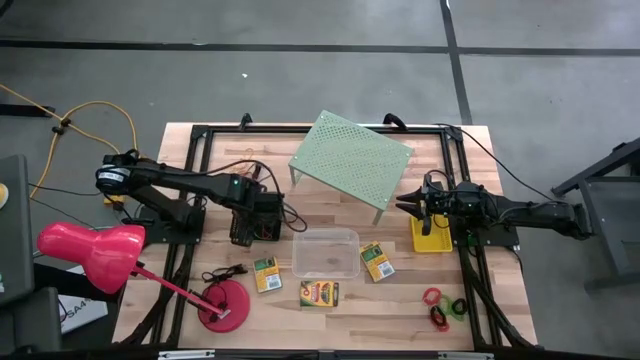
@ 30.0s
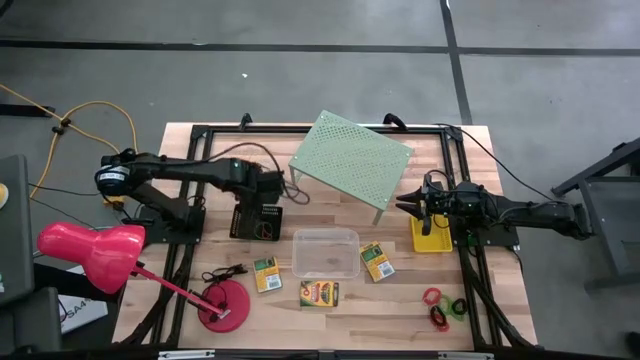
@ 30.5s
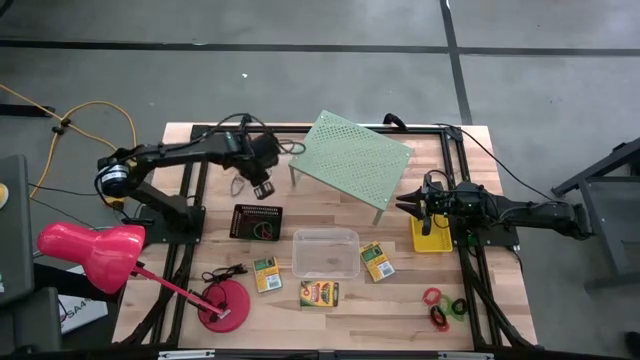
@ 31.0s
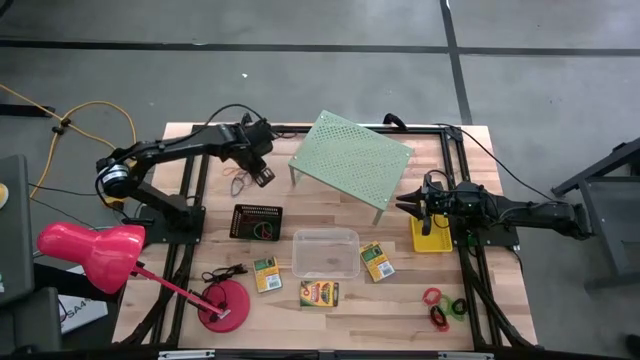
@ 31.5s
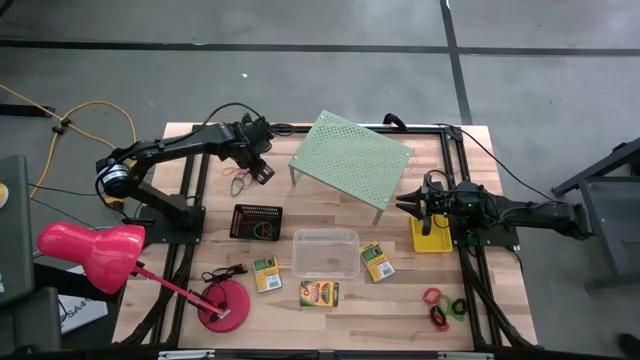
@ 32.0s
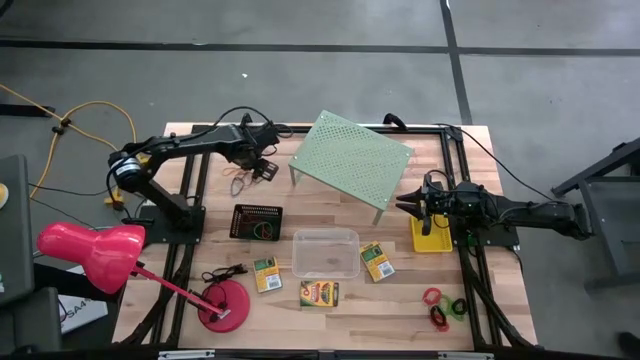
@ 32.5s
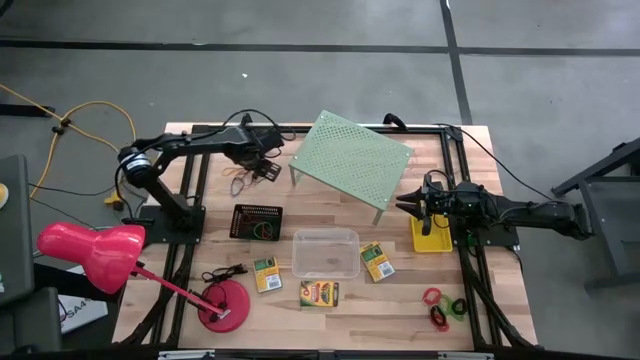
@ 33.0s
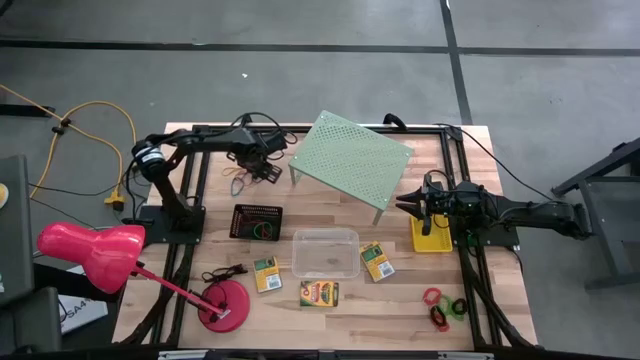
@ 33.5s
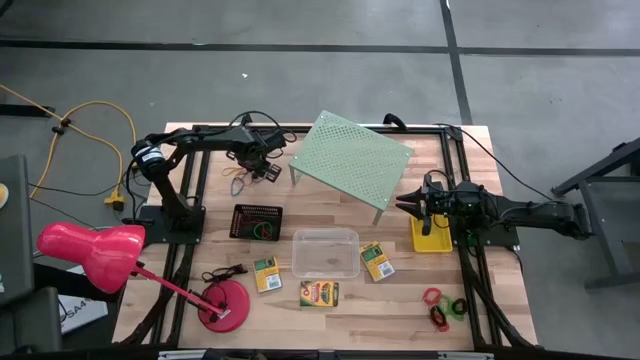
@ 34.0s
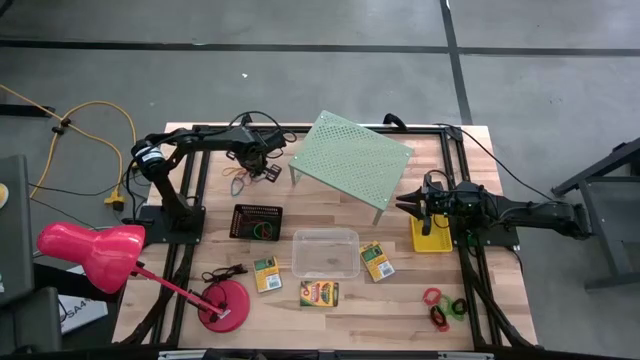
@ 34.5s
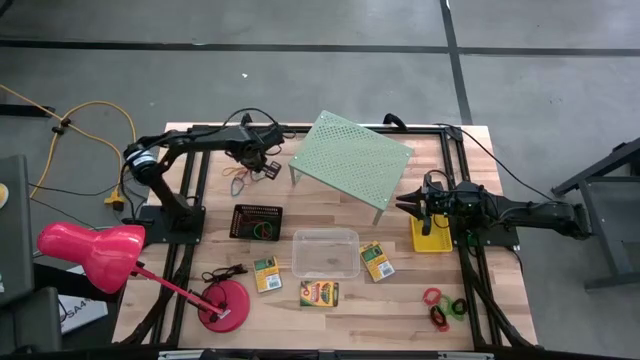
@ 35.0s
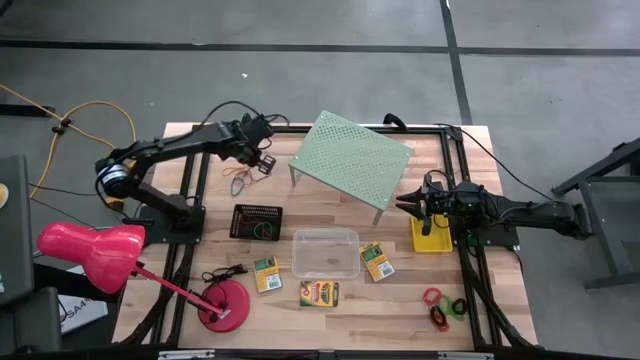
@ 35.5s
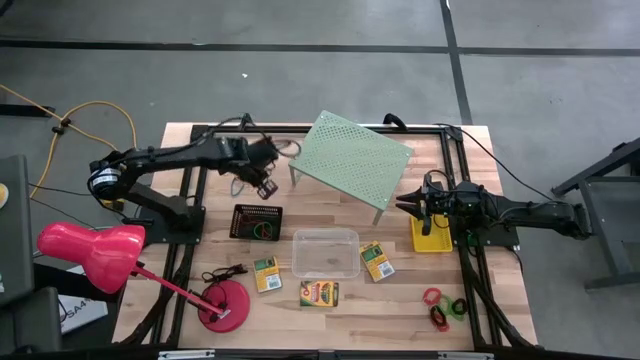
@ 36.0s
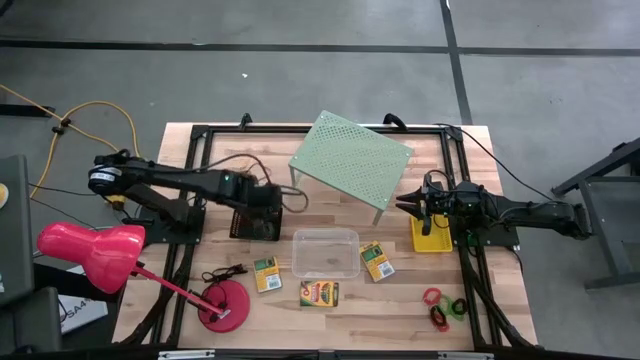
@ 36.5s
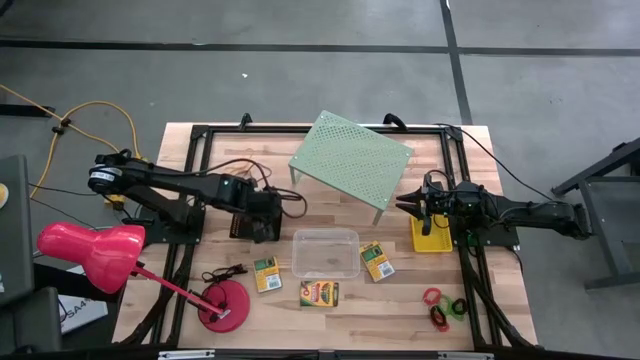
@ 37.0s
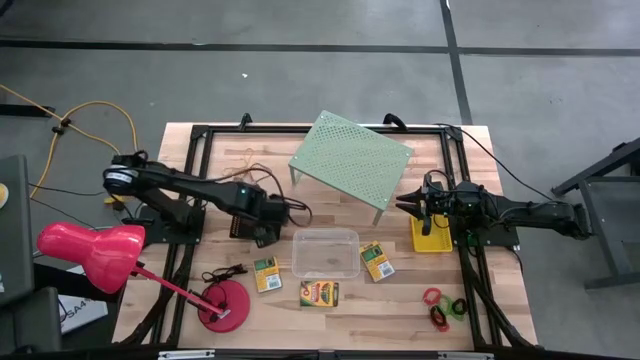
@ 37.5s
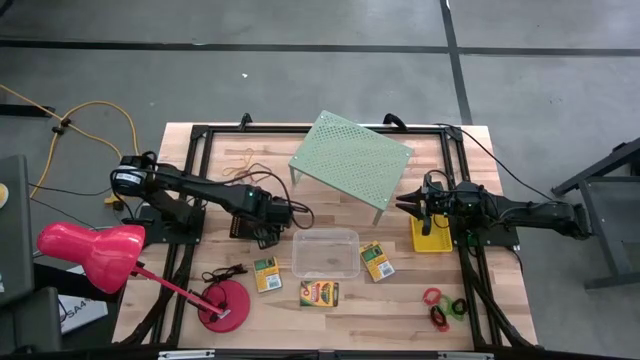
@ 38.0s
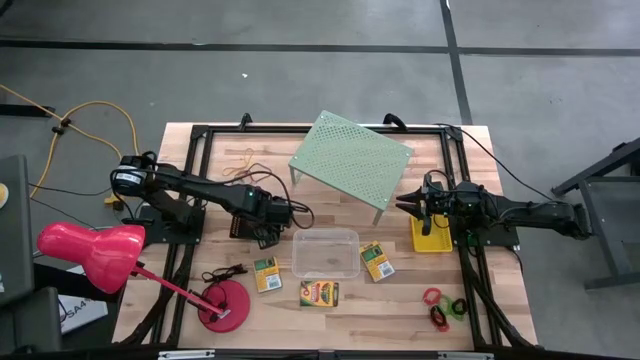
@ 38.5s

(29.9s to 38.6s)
Task: Pick & Place Office Desk Supplies
Put the black rubber band into the black bin

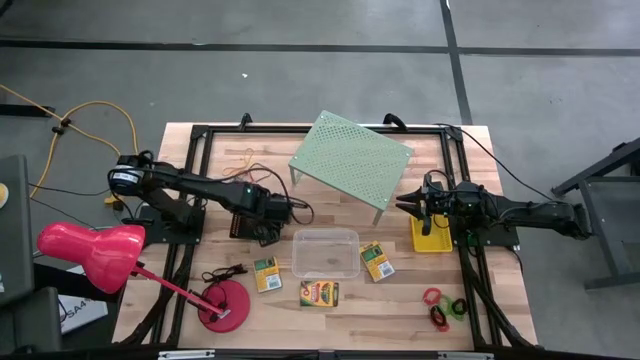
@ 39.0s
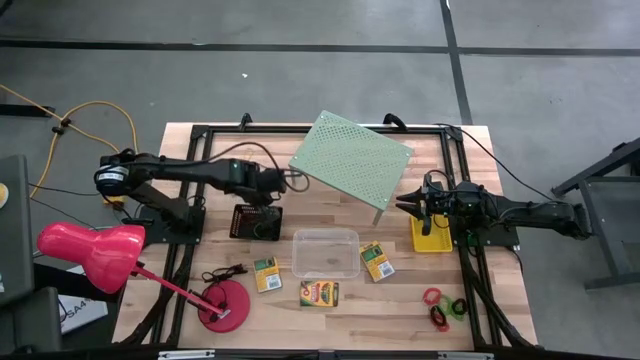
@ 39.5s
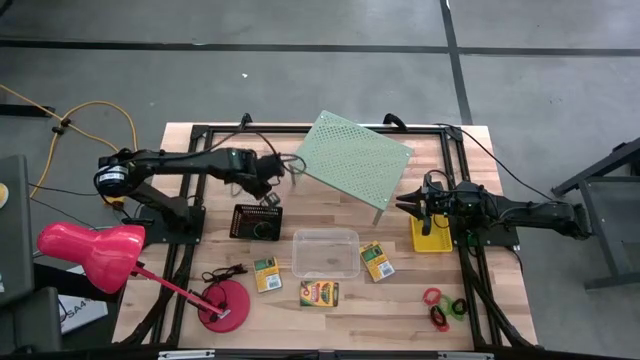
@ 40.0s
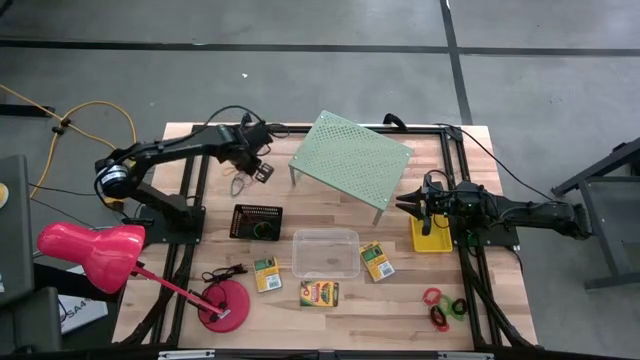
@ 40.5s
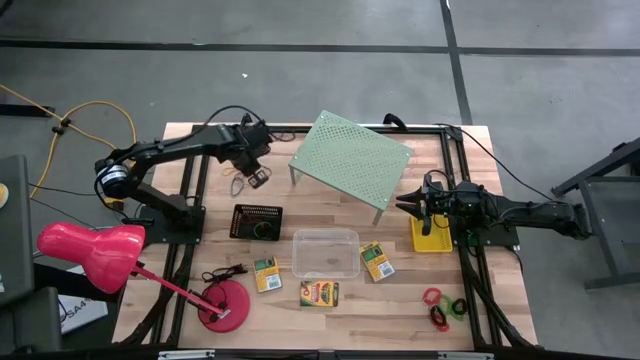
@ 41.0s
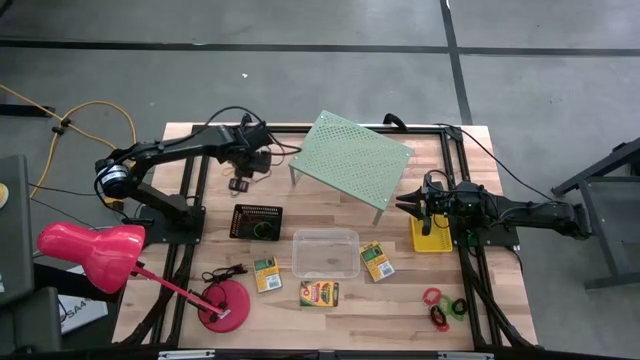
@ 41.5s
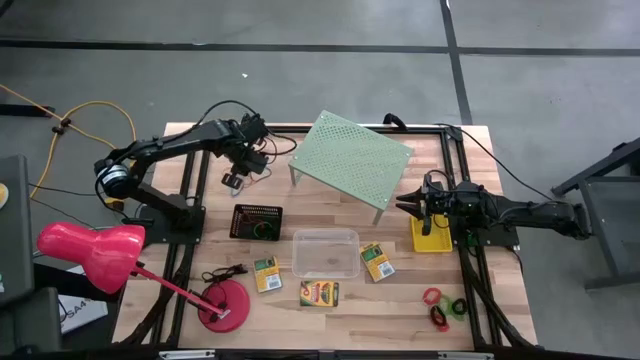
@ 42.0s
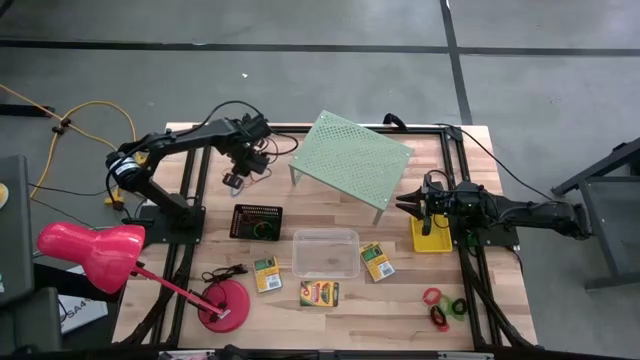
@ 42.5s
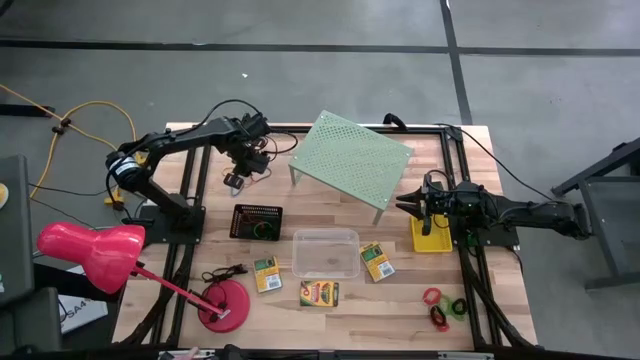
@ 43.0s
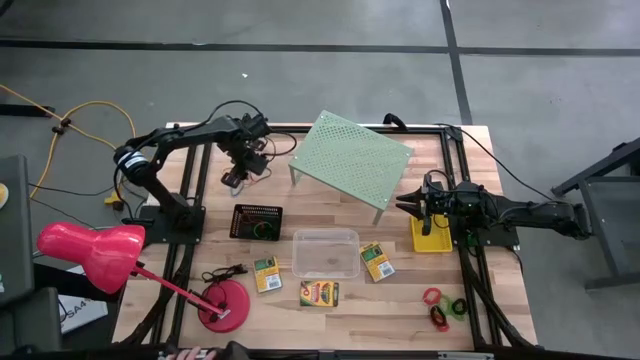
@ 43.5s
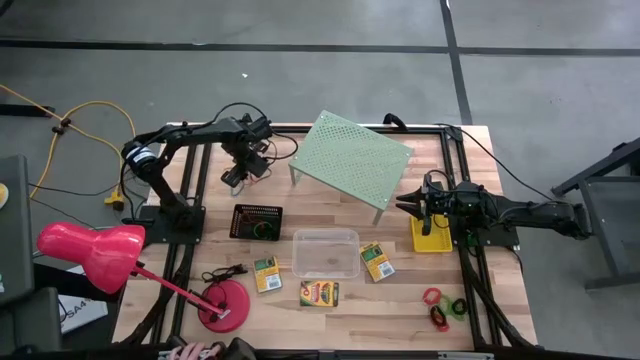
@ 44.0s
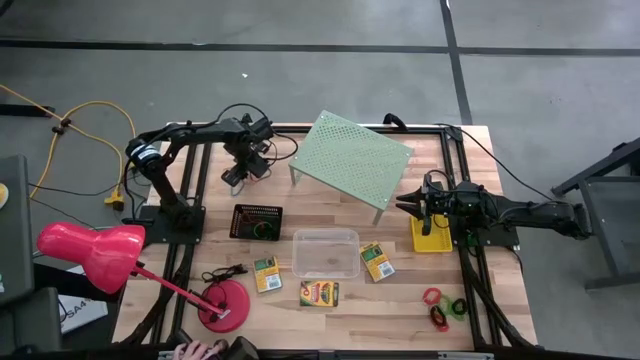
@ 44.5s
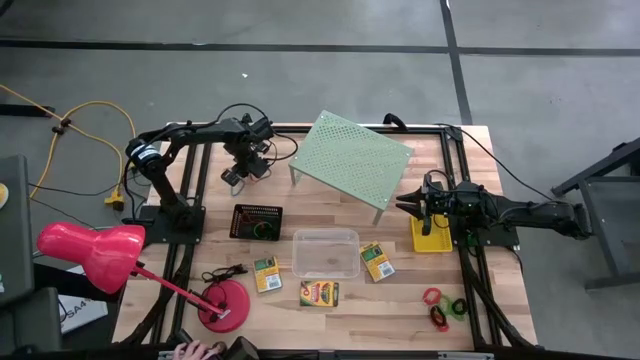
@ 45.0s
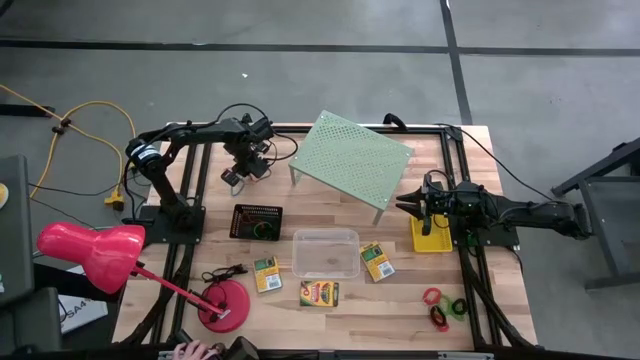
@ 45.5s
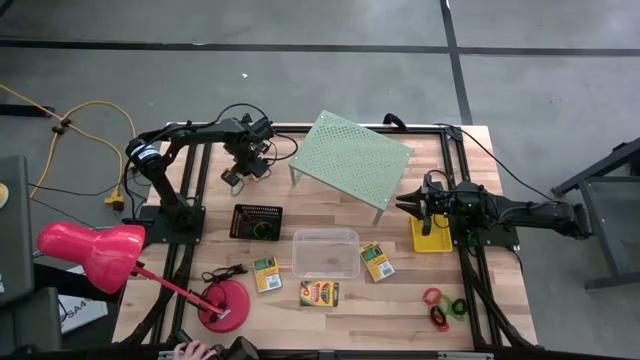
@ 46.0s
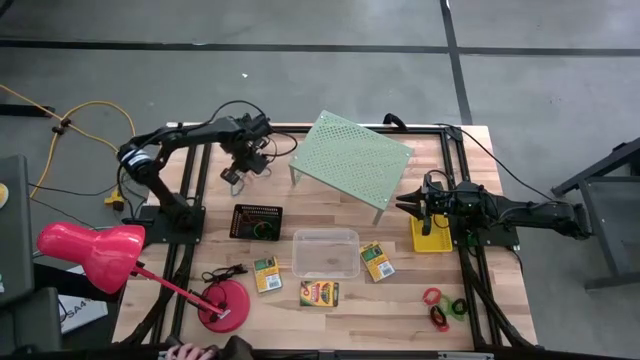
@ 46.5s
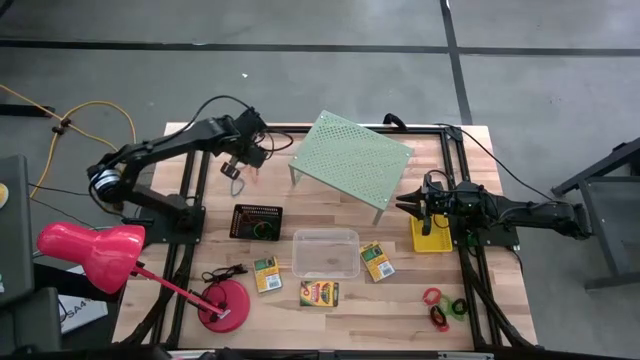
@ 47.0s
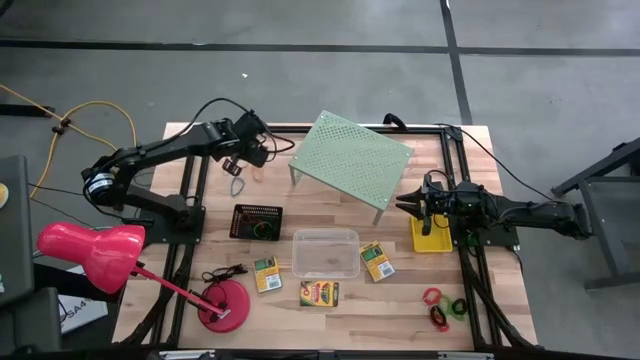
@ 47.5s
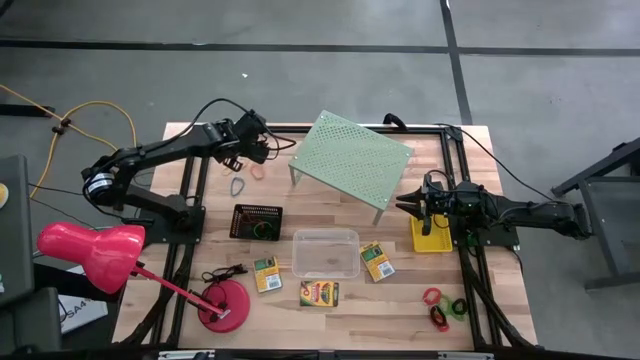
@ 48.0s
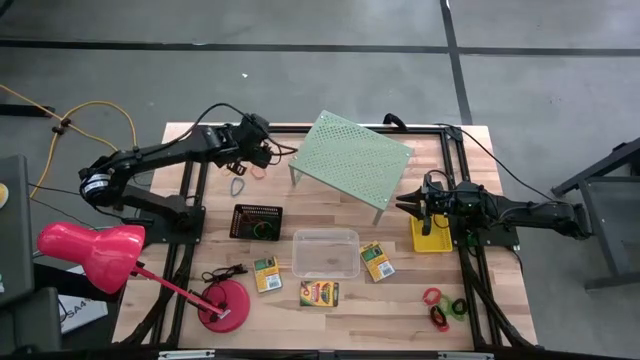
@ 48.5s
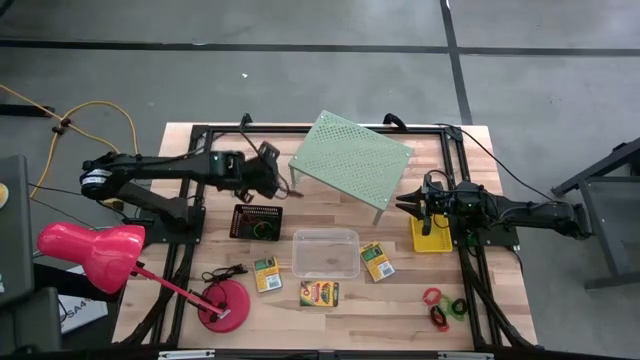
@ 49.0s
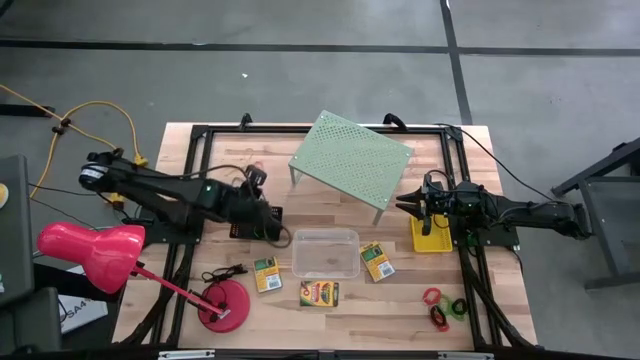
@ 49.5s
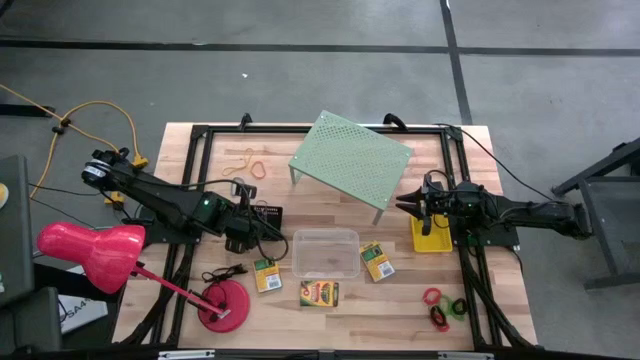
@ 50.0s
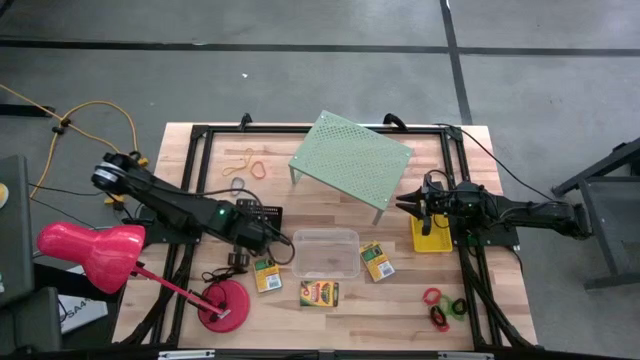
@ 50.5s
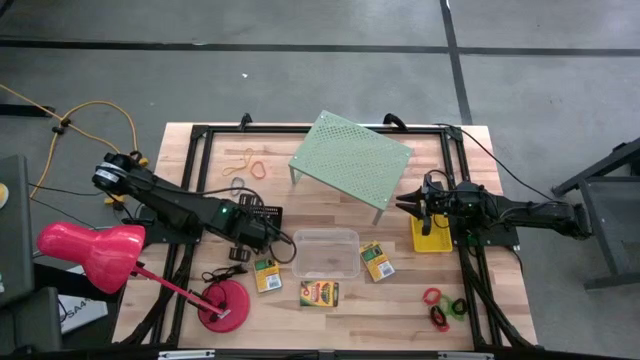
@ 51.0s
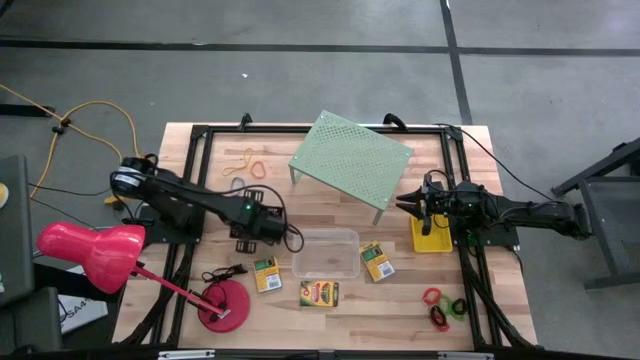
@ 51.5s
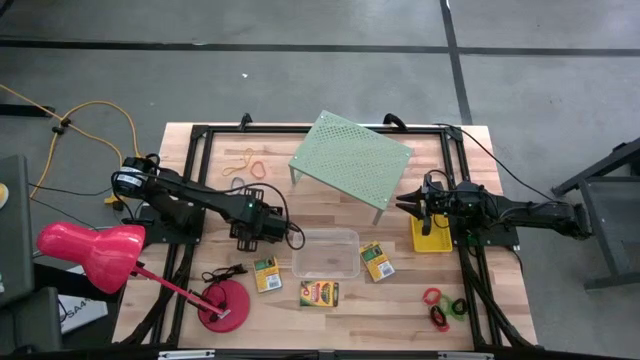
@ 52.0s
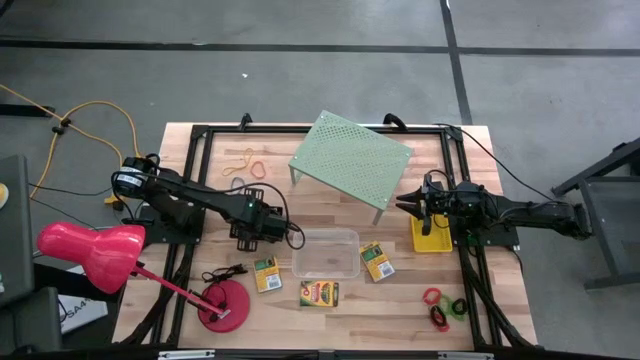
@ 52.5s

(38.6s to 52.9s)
Put the purple rubber band into the black bin
